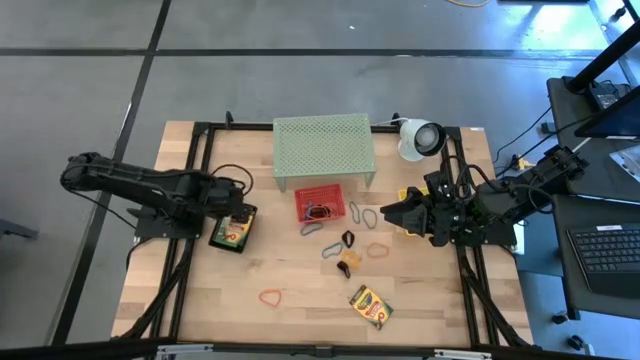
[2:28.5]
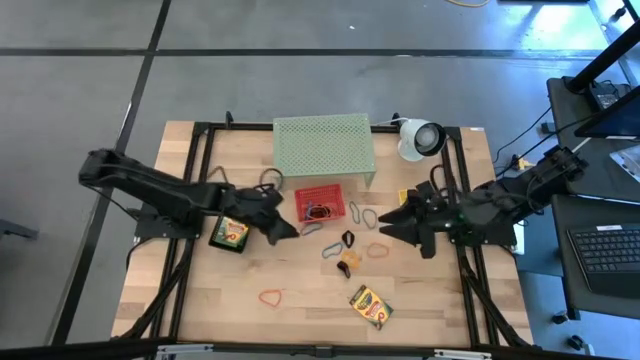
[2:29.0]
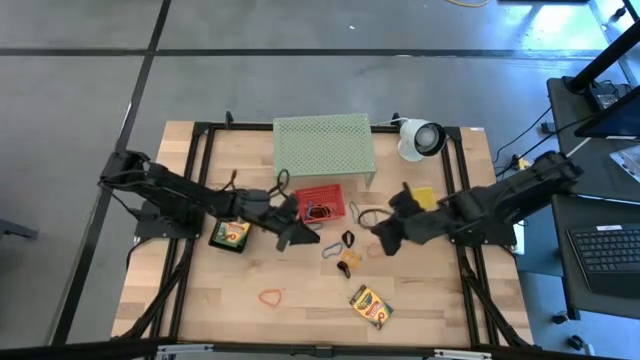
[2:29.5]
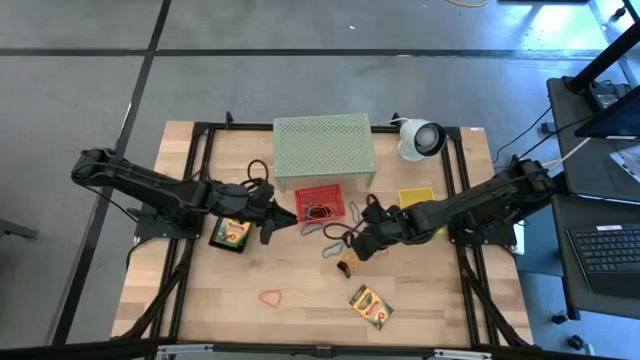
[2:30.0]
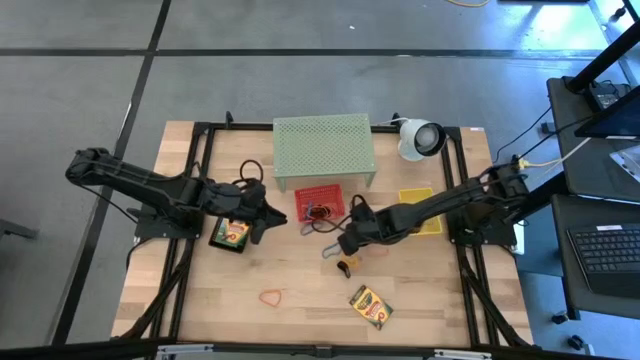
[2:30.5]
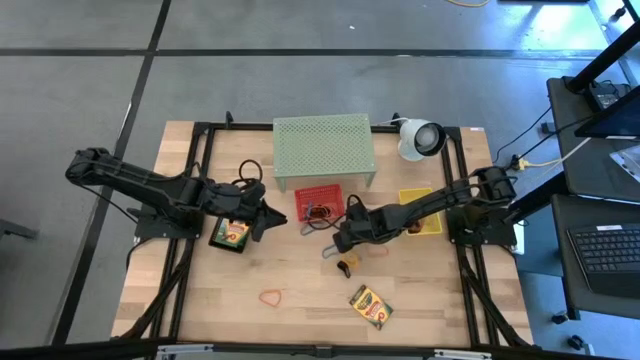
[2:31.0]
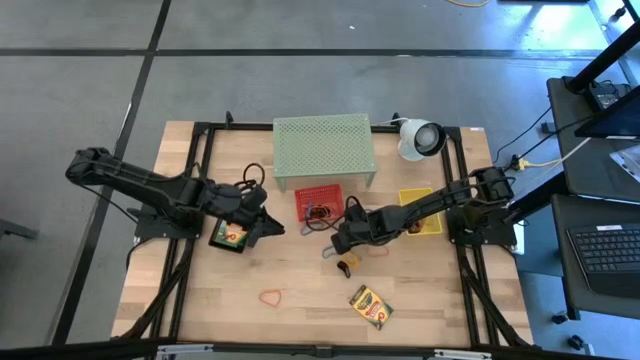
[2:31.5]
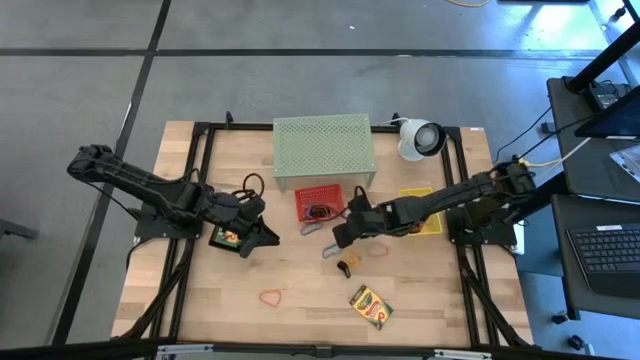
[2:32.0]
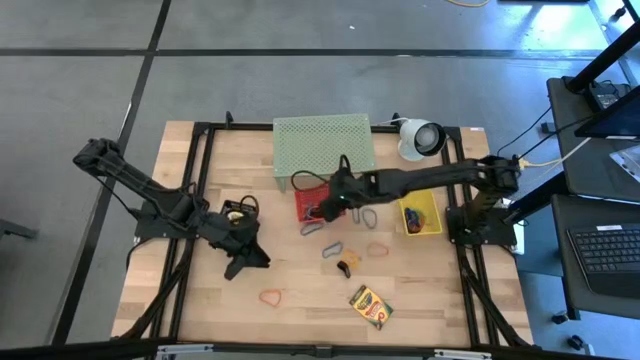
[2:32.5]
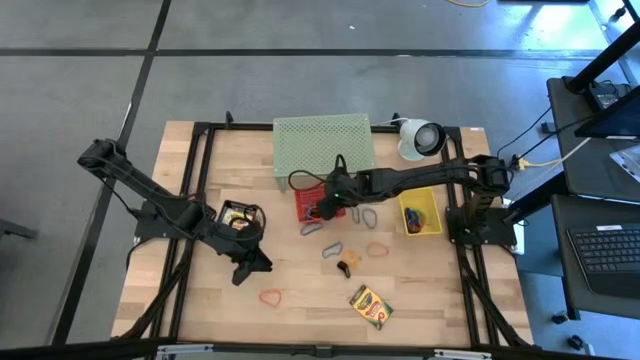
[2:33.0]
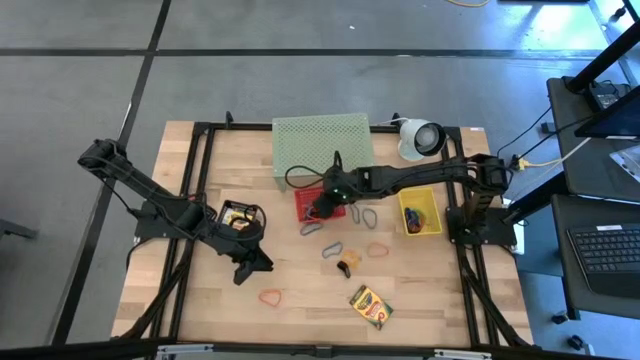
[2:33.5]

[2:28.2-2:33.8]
Task: Pick & Place Office Desk Supplies
Put the black rubber band into the red bin

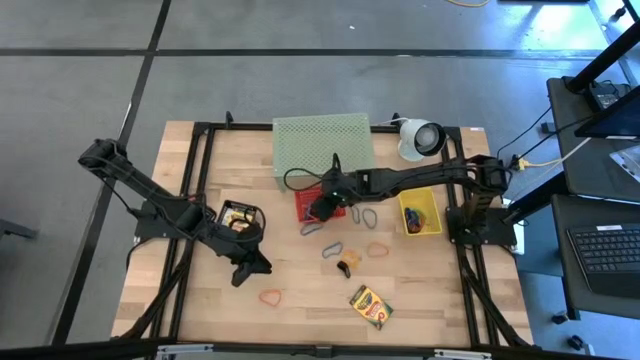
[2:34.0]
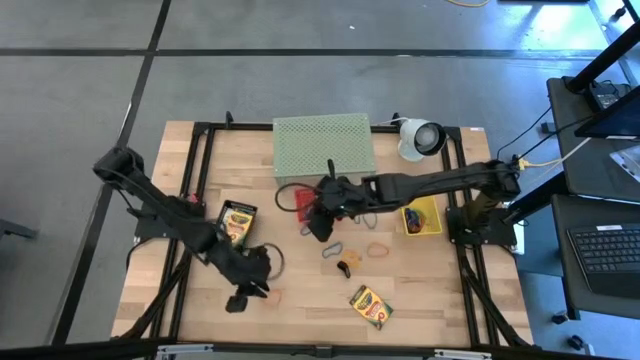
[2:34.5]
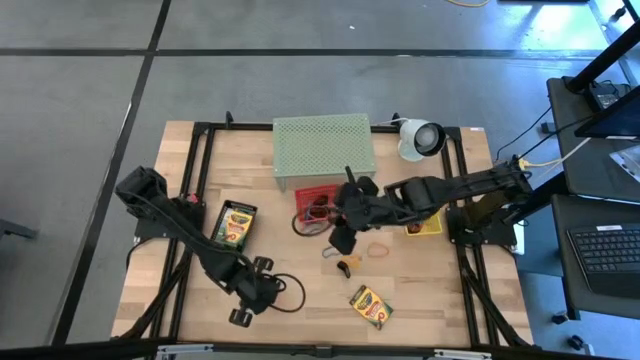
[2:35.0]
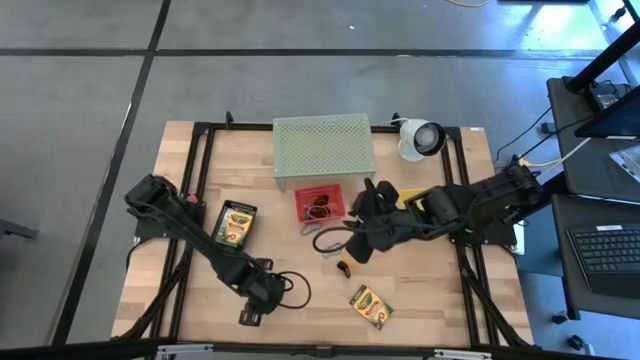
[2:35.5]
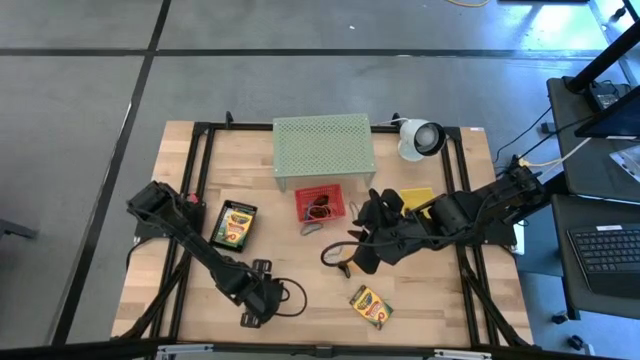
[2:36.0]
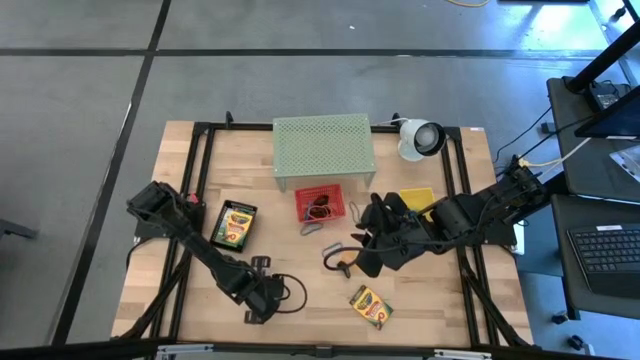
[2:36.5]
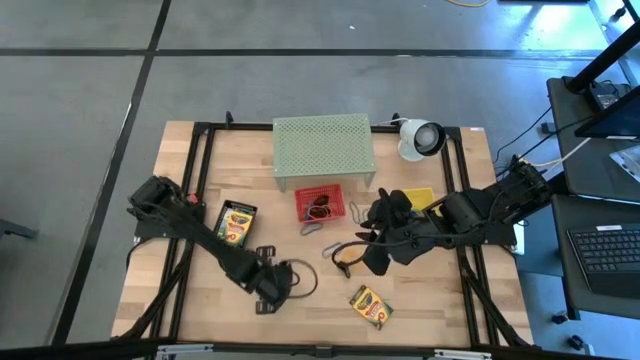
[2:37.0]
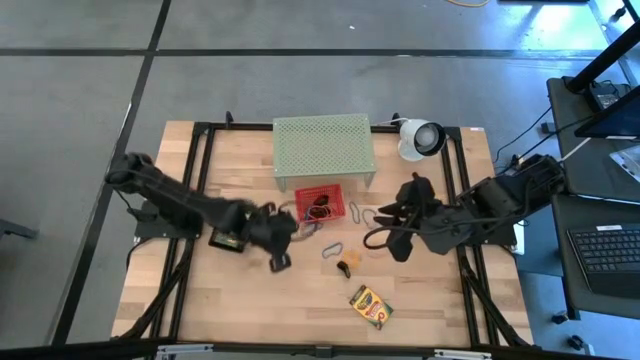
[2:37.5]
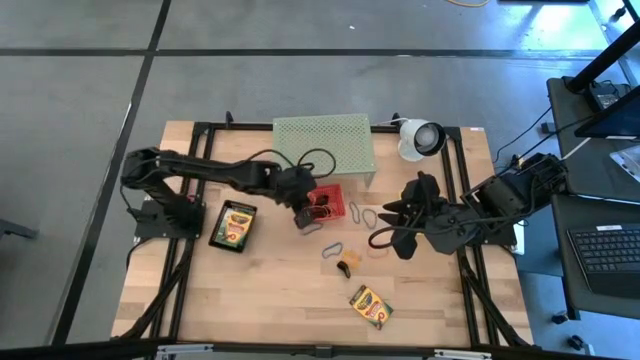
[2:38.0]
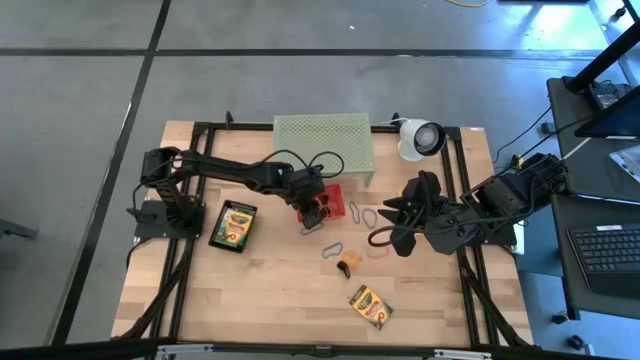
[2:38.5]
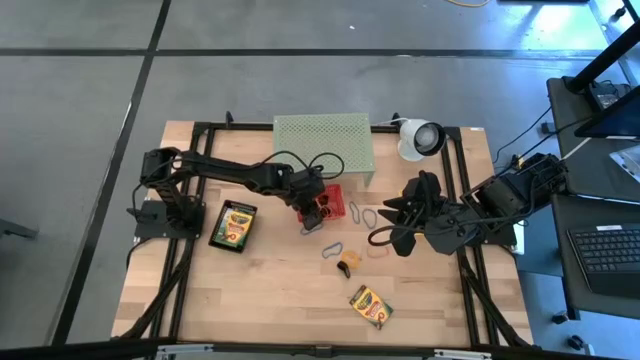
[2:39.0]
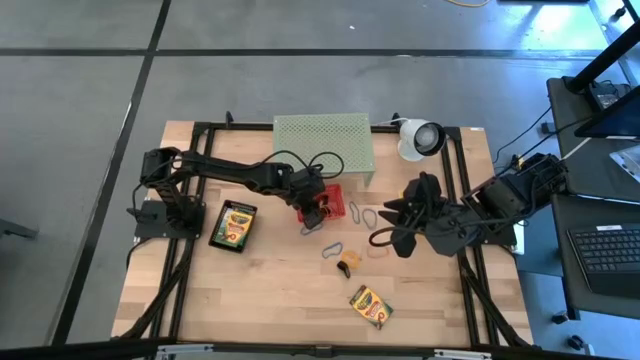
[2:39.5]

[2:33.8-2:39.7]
Put the orange rubber band into the red bin

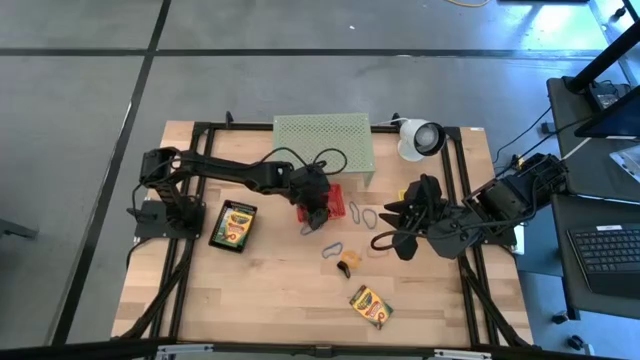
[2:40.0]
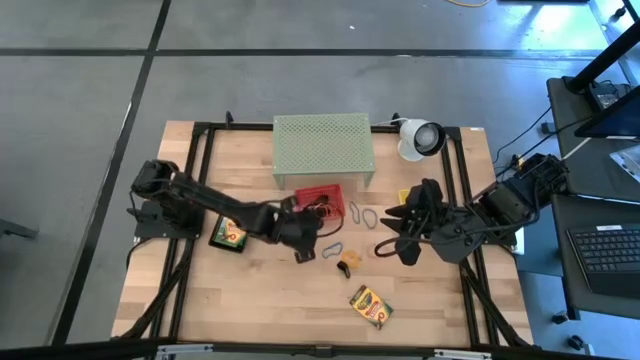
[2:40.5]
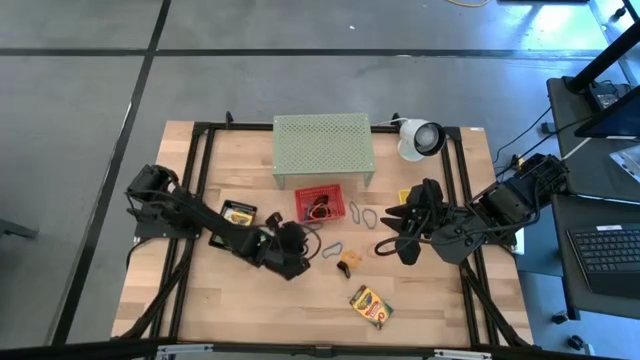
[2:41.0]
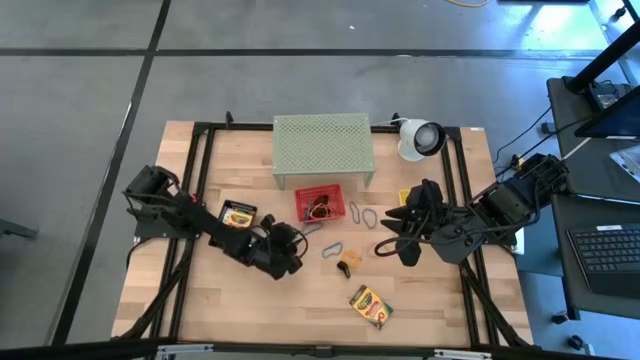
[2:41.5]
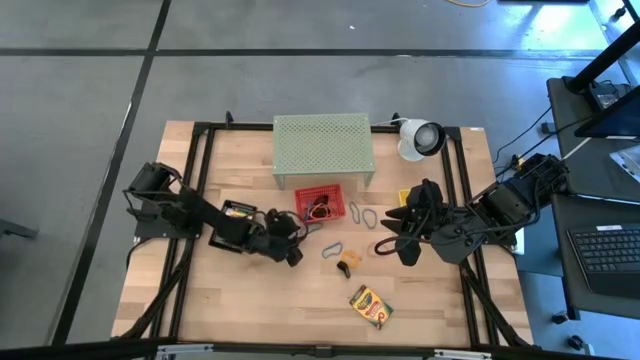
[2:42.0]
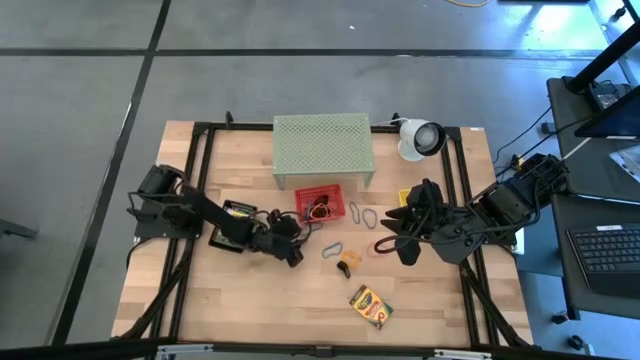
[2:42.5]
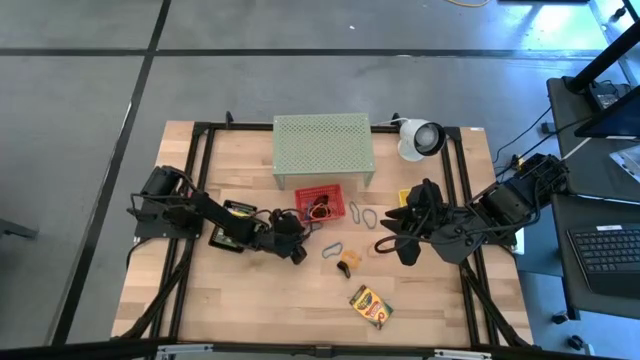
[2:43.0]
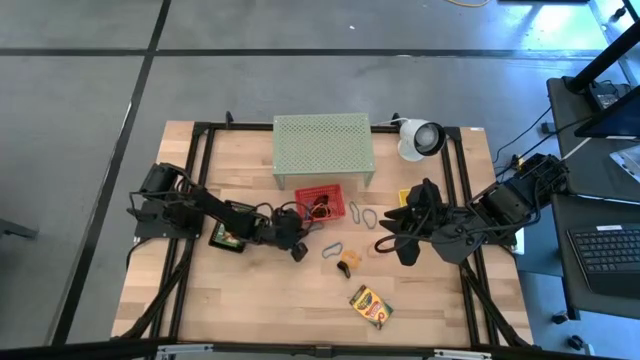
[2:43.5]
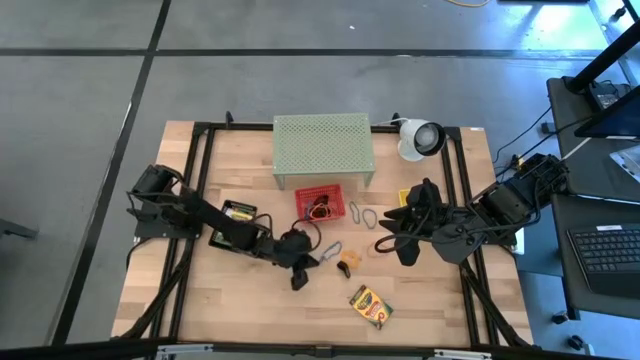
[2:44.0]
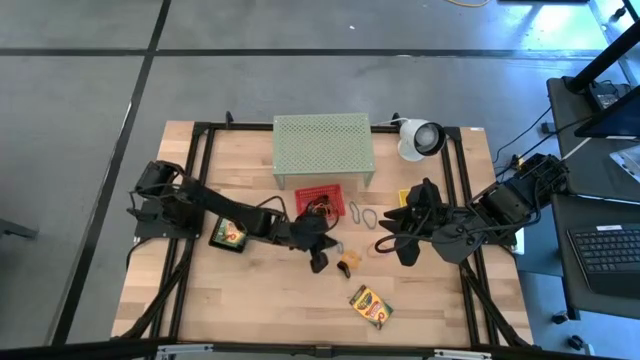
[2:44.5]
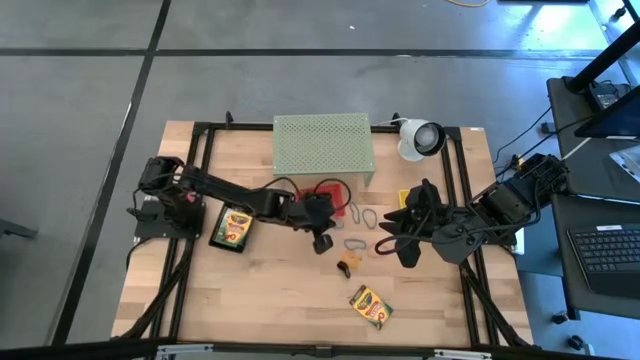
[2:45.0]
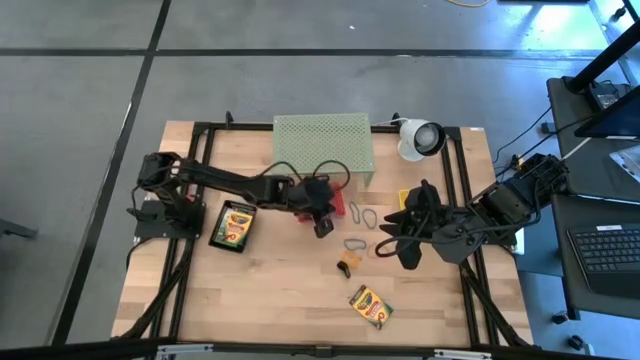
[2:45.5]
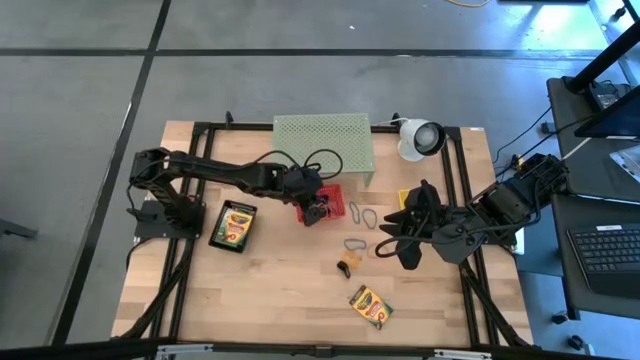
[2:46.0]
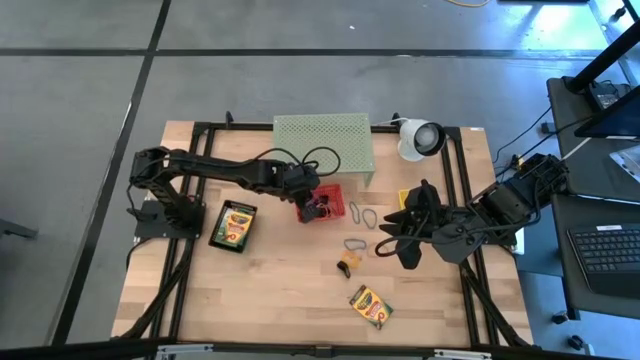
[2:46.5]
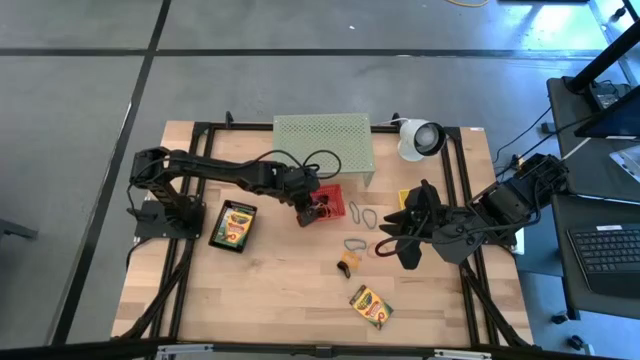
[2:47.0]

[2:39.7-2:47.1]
Put the blue rubber band into the red bin

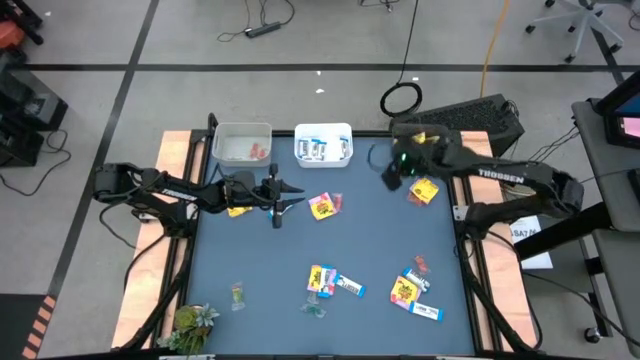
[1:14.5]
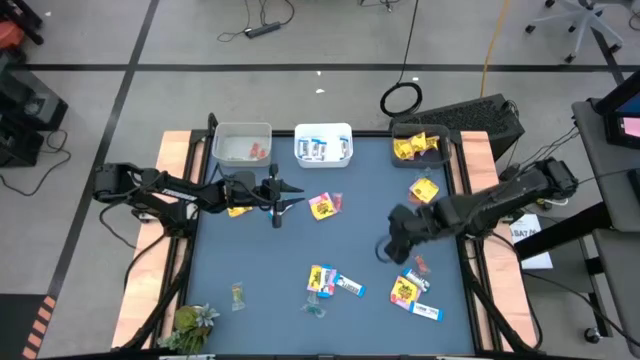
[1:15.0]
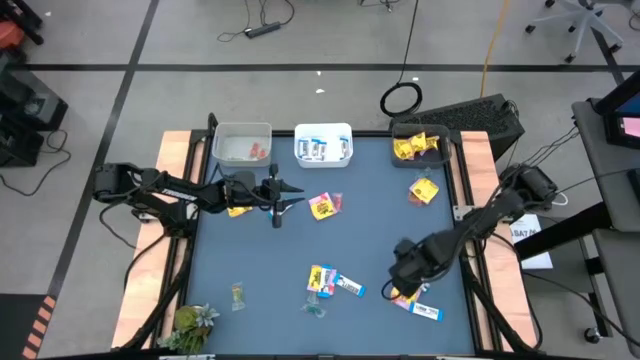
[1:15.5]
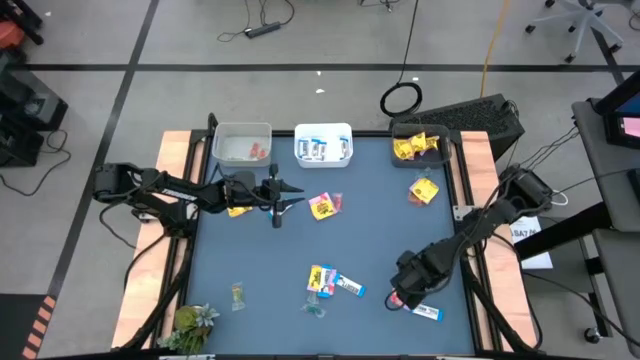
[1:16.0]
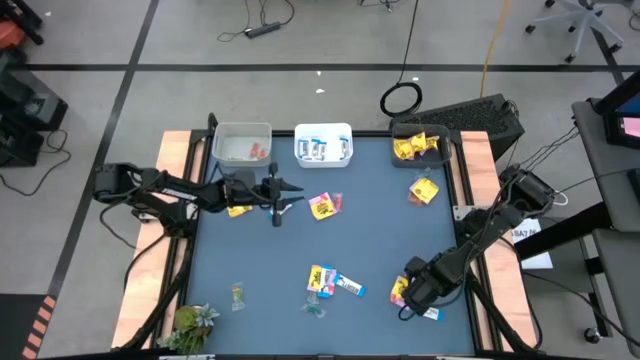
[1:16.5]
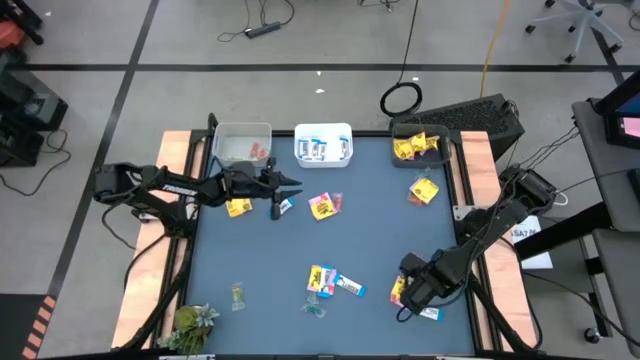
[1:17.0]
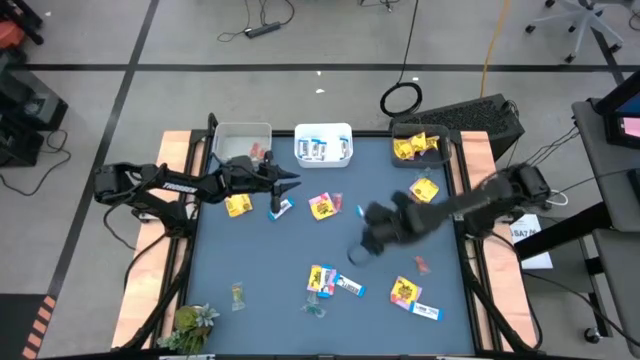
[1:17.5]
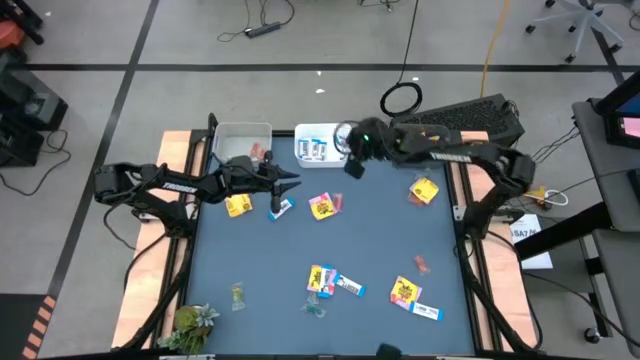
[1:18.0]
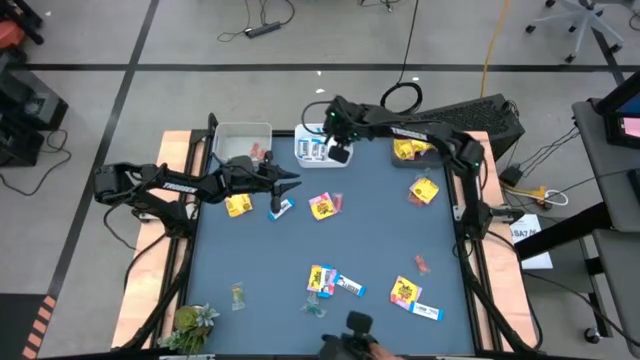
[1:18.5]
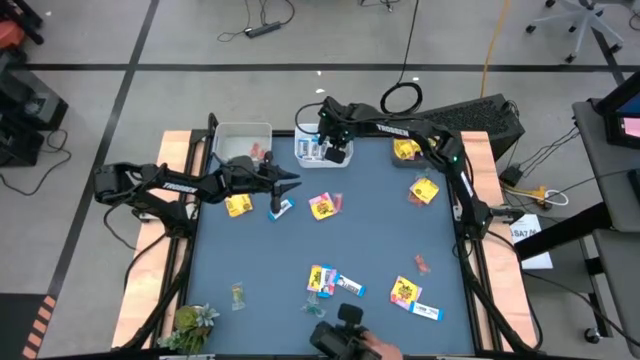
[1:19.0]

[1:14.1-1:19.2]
Task: Sort candy
Put the white chocolate into the white bin
